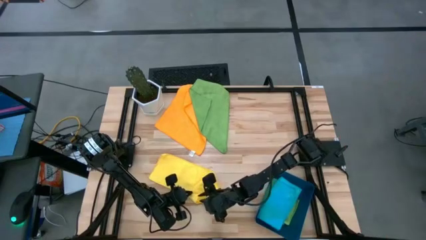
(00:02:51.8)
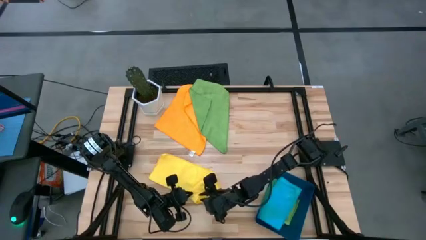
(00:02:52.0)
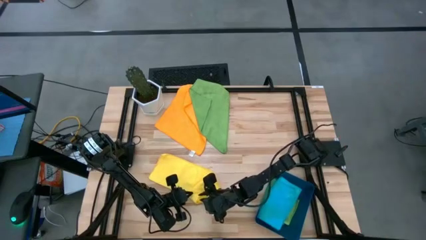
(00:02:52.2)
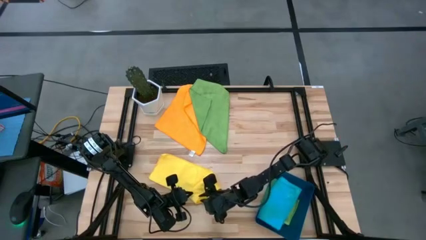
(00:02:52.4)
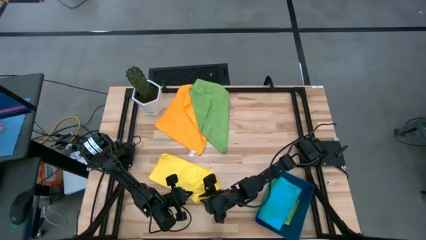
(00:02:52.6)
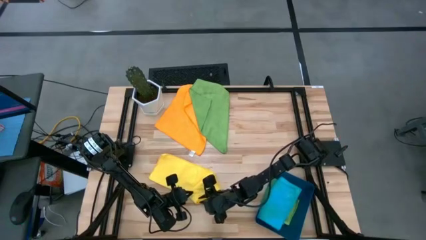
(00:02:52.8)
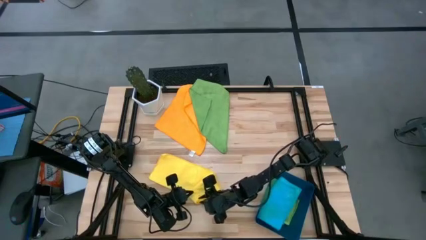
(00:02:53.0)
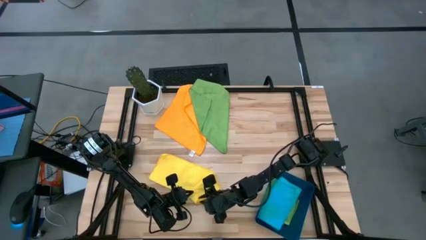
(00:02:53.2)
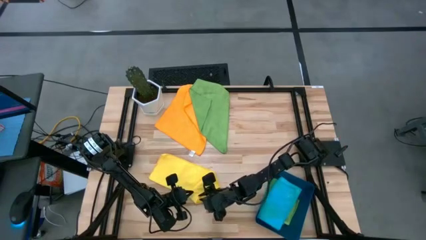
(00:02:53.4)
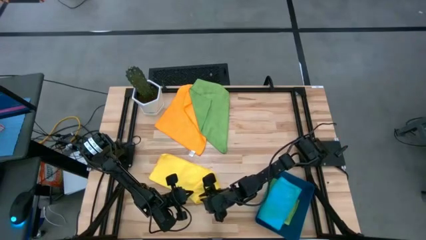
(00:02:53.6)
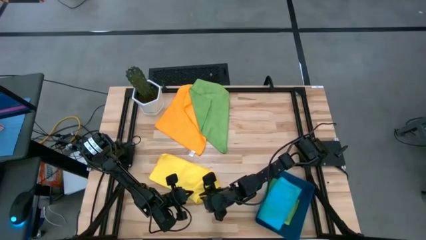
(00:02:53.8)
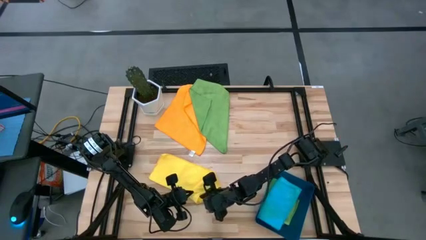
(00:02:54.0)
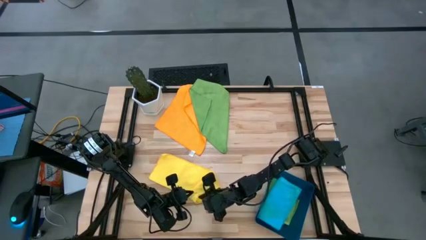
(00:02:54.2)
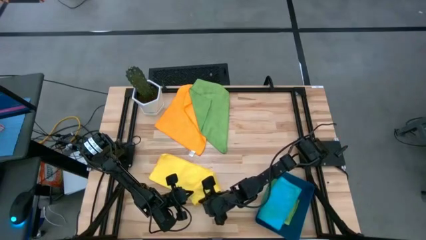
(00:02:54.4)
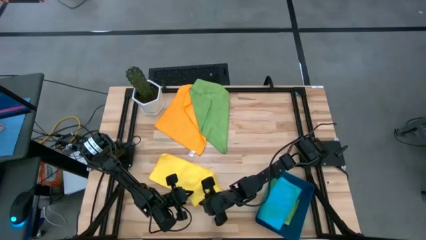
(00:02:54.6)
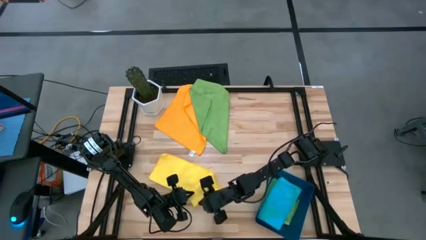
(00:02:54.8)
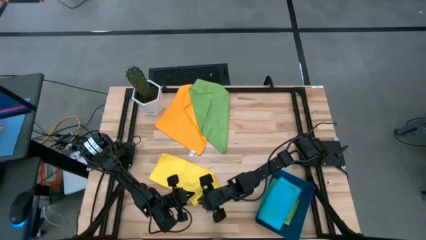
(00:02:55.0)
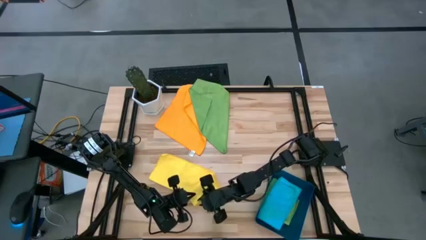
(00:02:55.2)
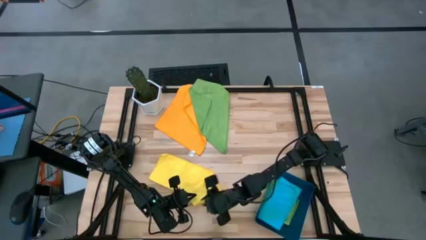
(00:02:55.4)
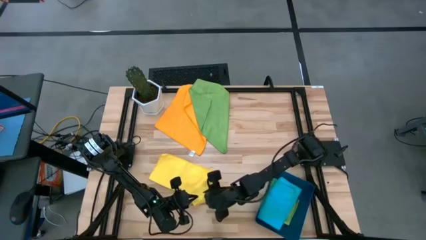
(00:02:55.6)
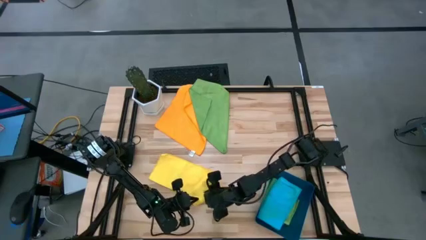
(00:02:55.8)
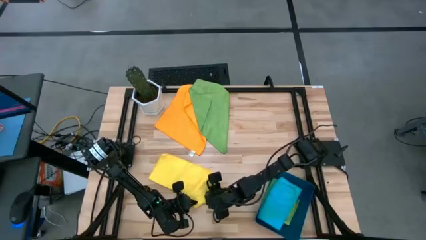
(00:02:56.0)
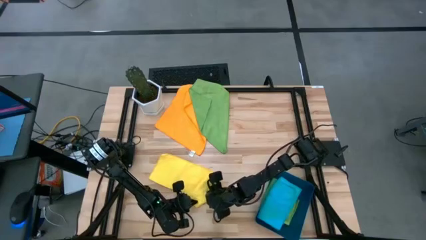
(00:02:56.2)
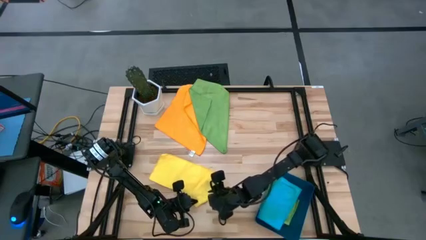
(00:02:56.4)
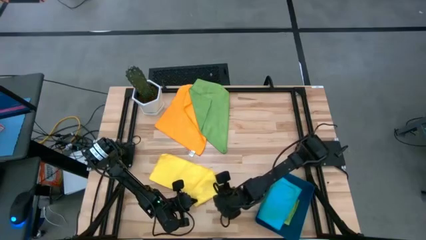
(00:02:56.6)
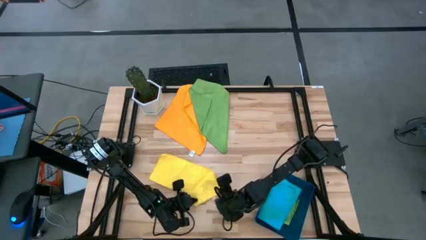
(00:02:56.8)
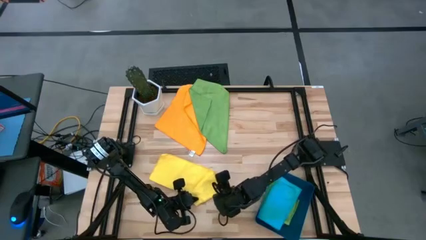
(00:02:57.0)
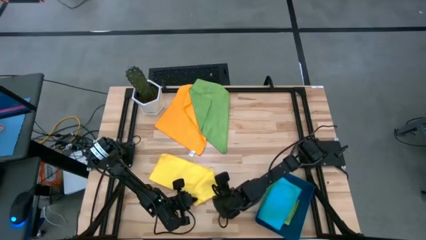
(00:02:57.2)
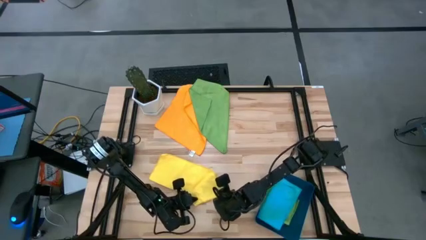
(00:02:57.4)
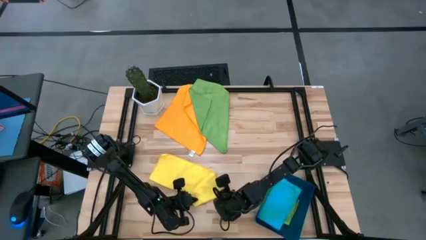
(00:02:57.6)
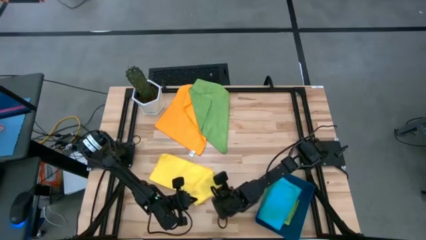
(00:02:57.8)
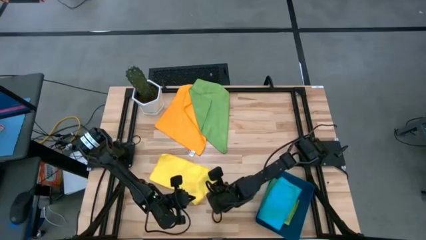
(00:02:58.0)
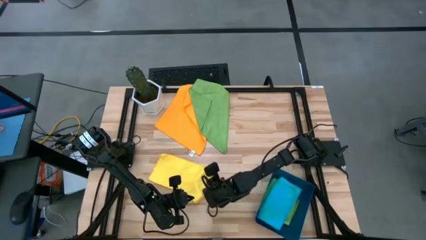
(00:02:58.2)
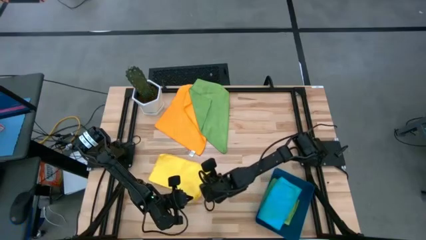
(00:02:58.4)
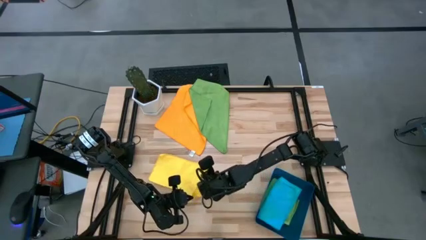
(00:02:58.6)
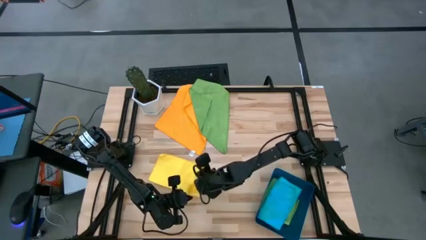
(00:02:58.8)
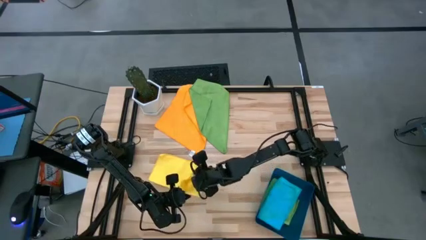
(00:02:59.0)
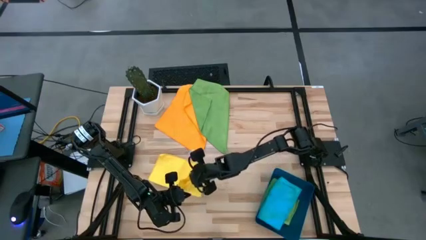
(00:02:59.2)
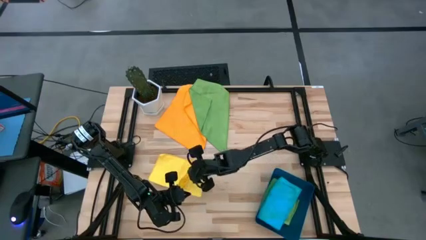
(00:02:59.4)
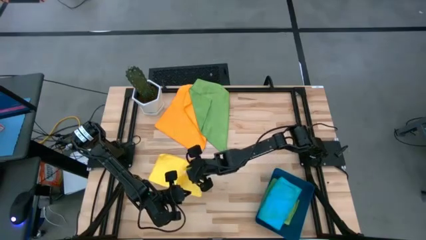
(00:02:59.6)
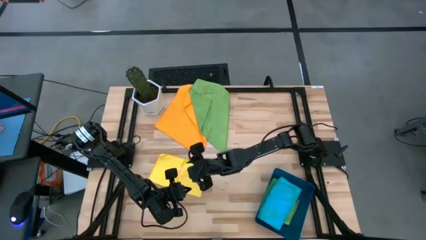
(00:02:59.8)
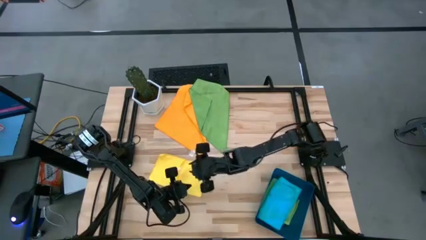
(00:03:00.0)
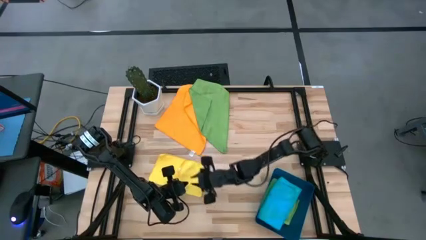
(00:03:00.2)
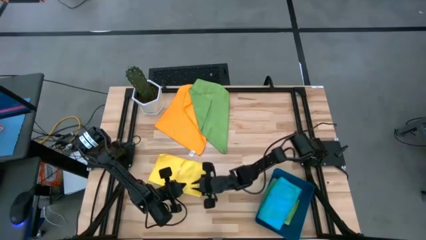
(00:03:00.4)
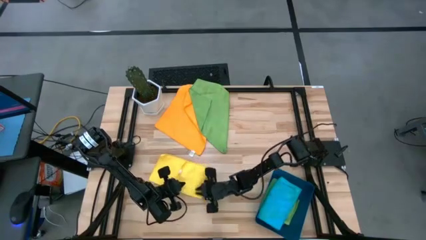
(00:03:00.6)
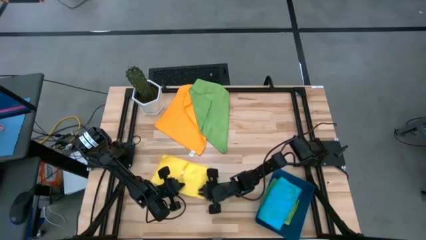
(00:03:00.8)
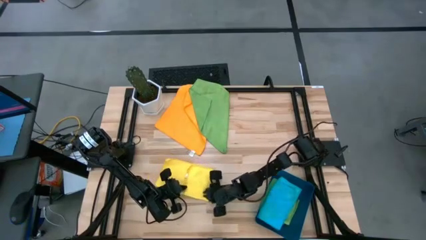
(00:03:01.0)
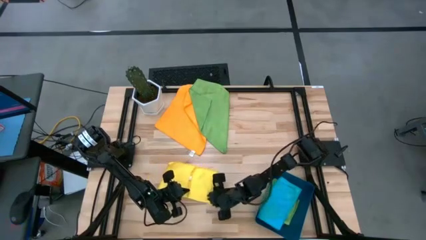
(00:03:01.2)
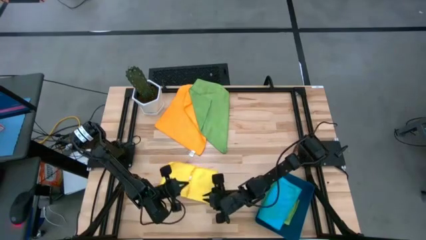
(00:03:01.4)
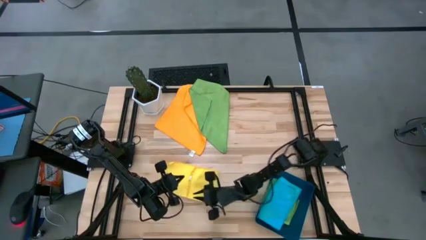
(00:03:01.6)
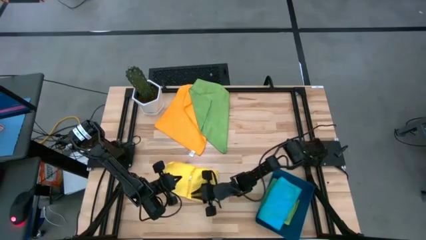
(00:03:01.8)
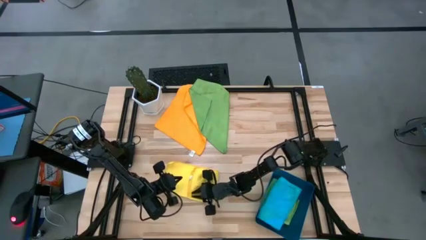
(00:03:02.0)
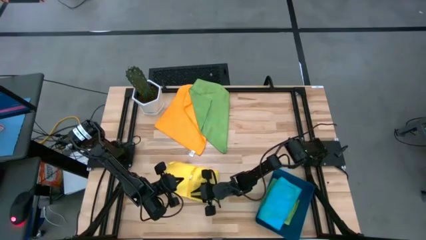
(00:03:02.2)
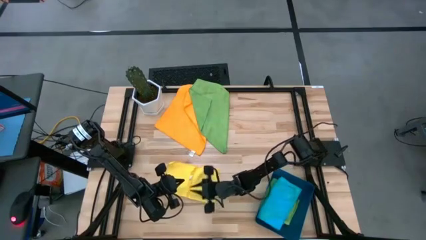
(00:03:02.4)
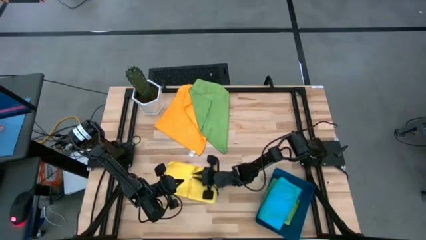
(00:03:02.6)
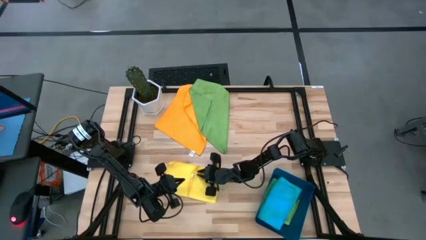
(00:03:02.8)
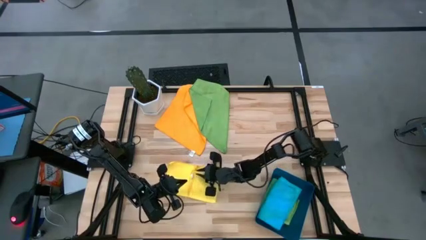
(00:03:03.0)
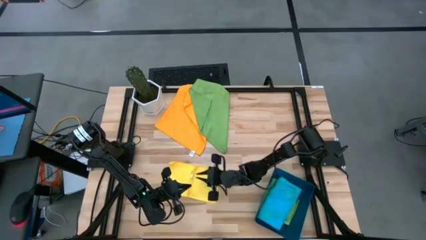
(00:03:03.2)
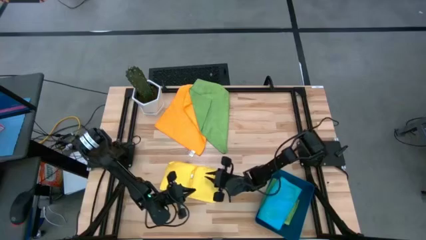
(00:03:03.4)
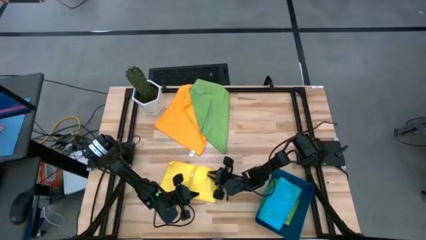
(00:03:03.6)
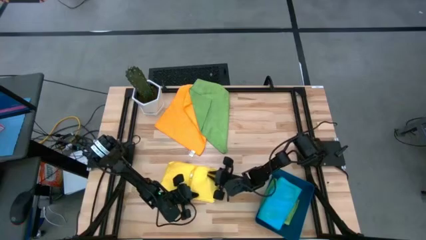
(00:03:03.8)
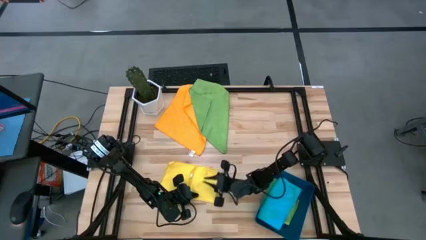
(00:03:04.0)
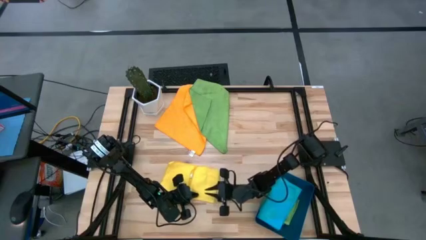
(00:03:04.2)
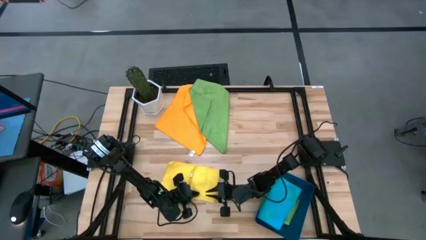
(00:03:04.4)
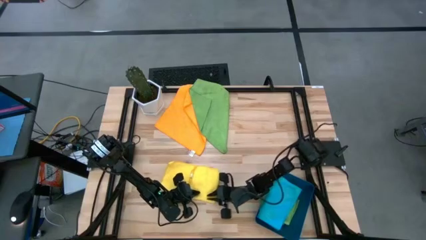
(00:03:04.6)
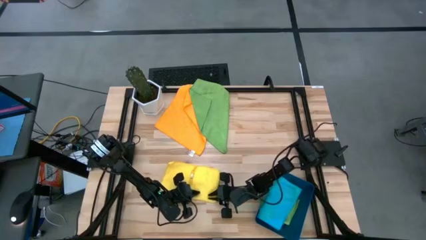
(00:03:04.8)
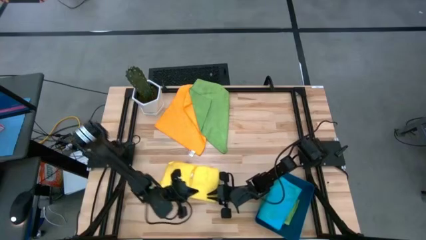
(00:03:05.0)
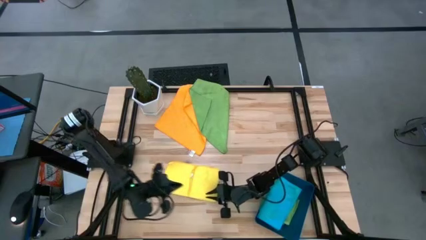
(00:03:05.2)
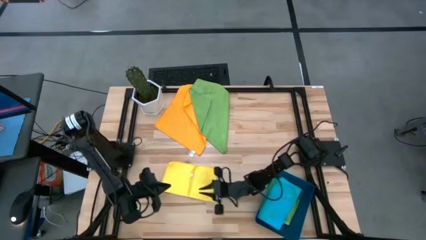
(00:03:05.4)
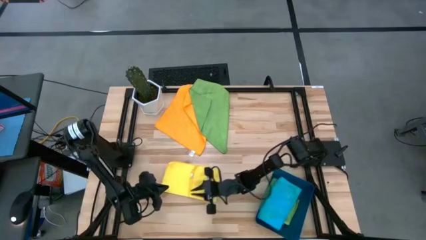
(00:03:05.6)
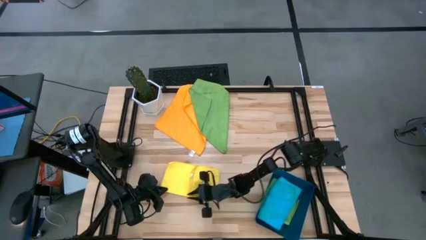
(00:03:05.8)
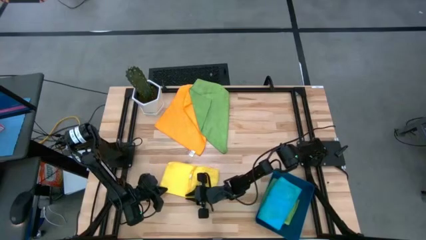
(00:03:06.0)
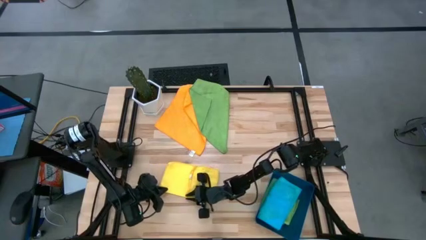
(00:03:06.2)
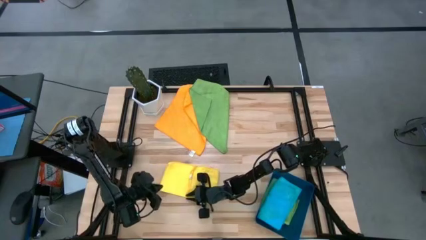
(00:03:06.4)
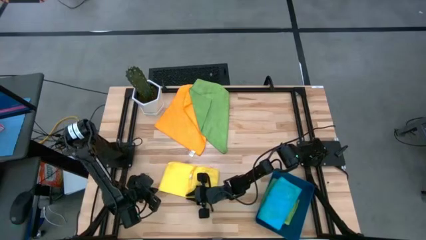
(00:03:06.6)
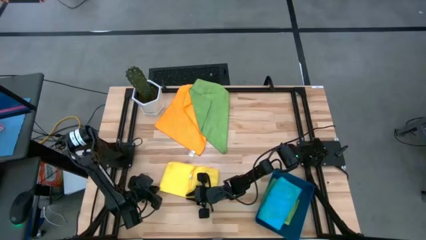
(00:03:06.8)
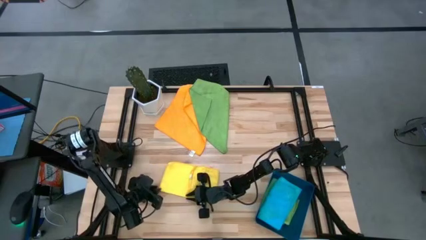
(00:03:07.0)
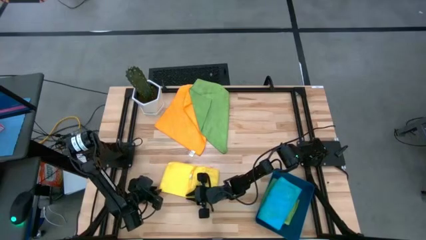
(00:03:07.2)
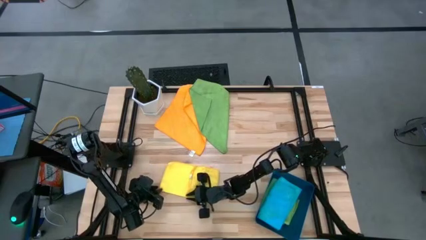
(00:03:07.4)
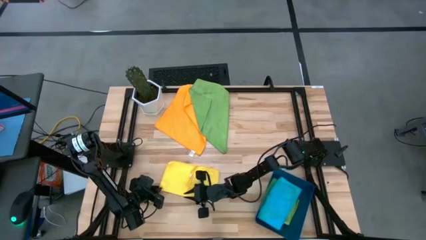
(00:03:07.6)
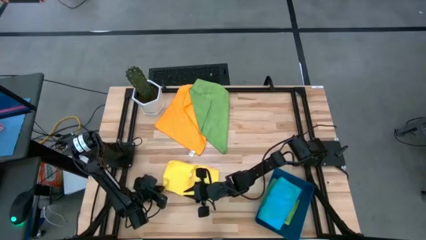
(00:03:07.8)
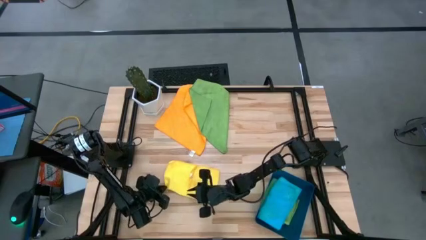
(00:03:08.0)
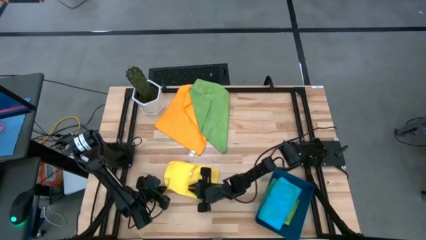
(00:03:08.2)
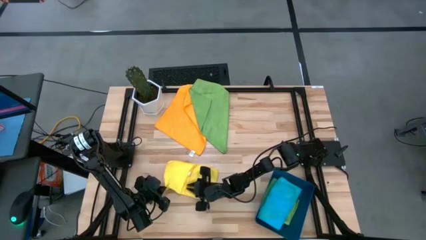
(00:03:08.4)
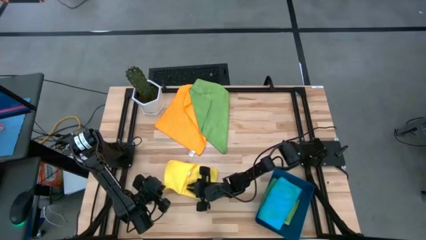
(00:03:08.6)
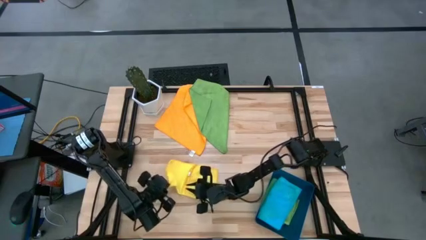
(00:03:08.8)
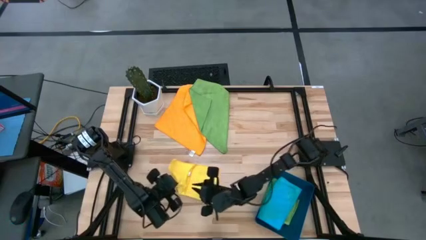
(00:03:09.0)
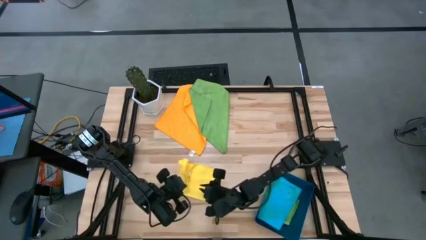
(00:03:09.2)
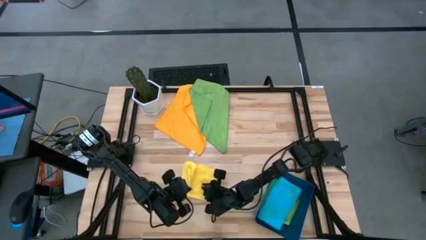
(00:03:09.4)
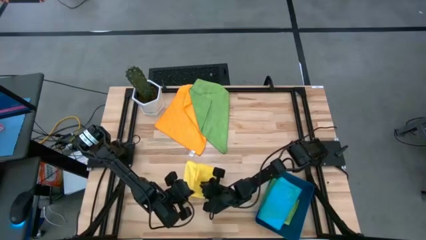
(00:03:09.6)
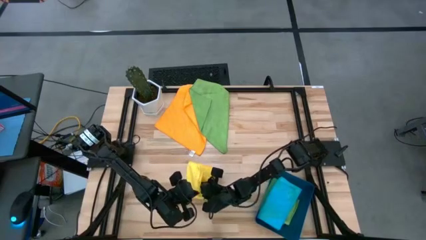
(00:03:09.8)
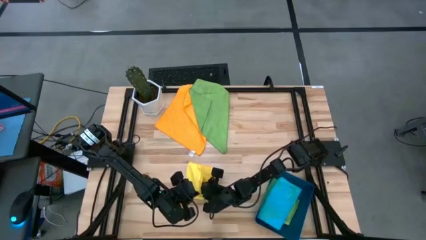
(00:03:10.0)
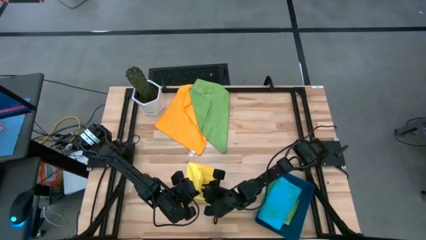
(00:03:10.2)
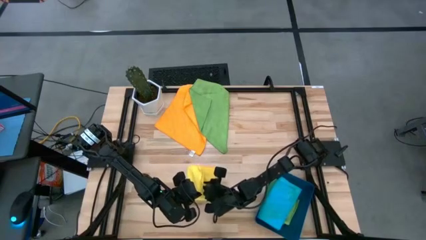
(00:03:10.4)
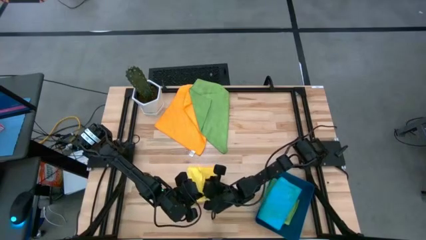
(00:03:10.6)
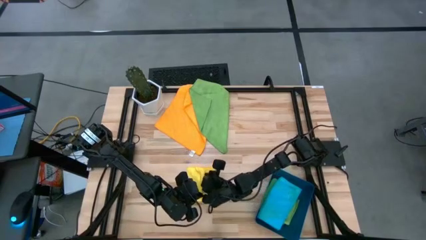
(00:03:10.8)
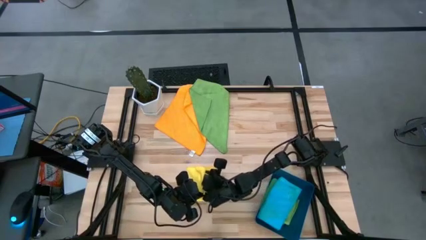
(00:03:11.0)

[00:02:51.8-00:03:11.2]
Task: Fold microfiber towels
Fold the yellow microfiber towel
